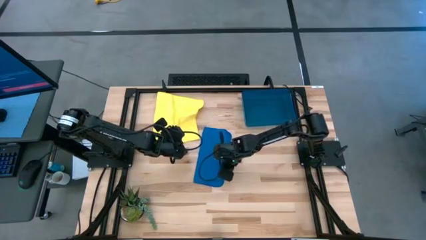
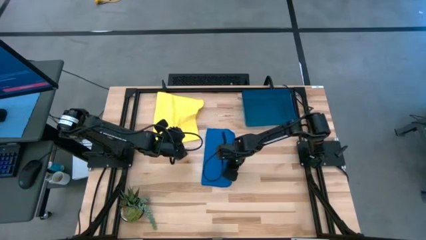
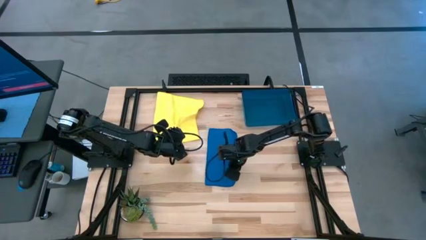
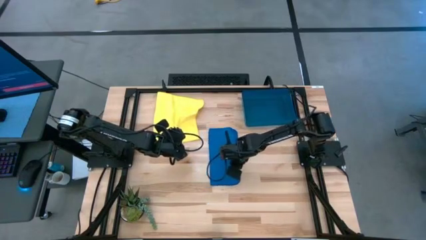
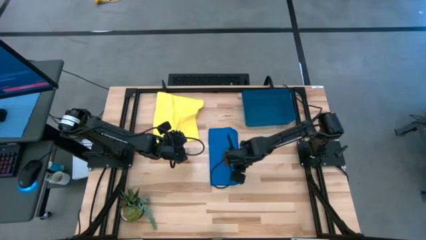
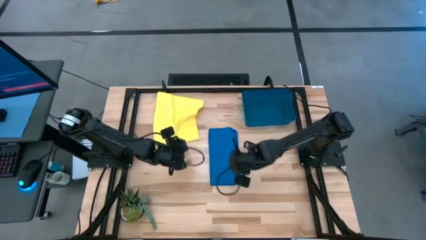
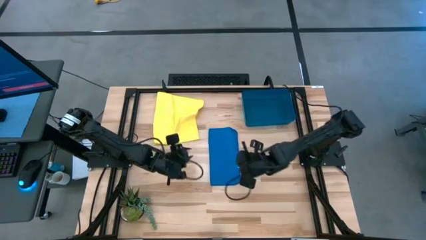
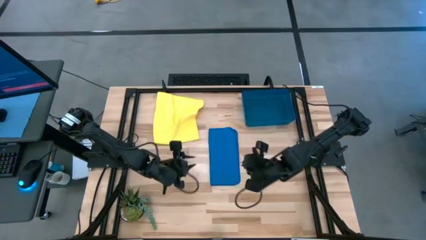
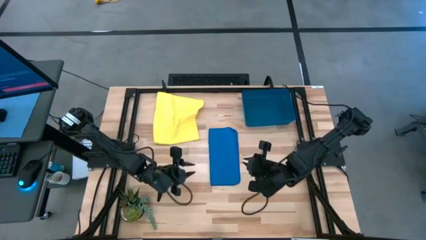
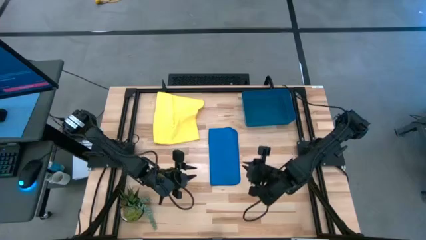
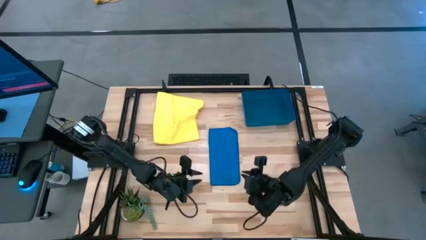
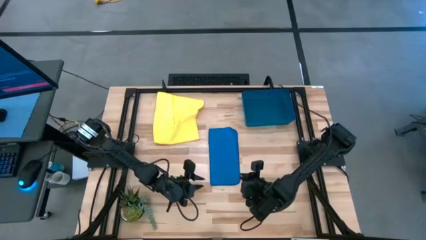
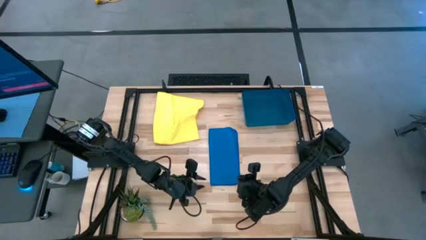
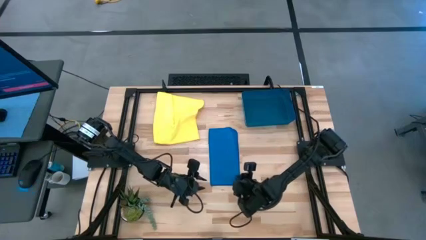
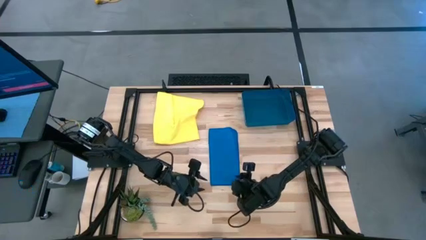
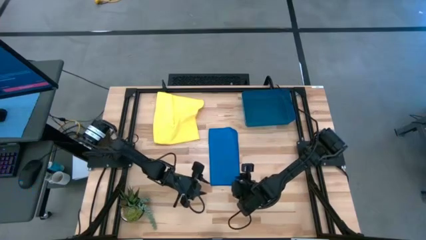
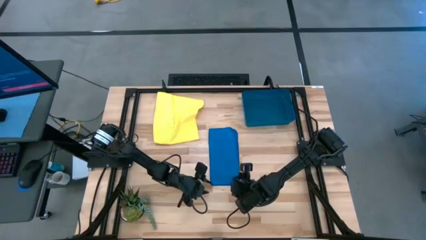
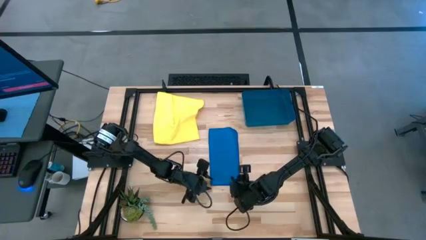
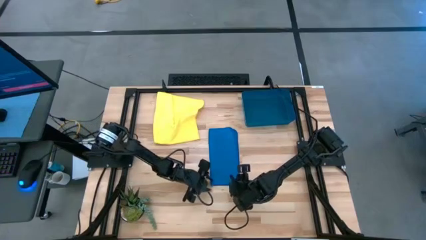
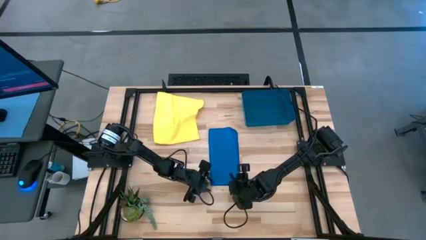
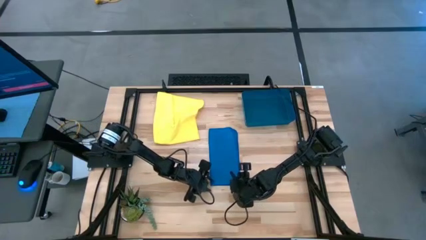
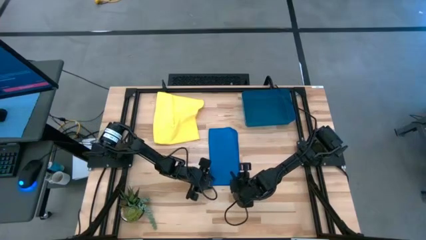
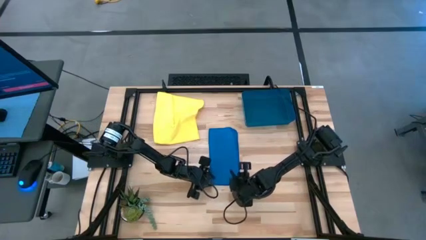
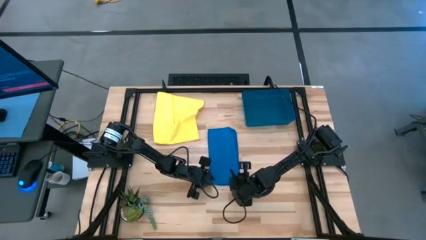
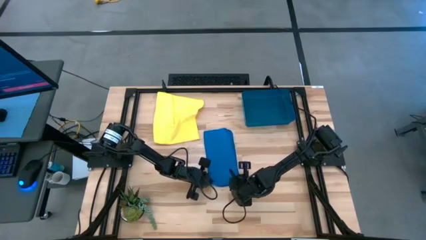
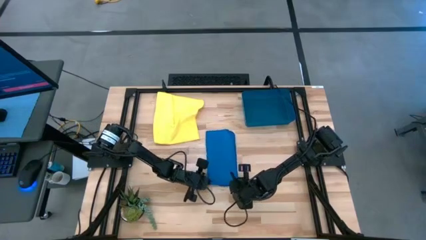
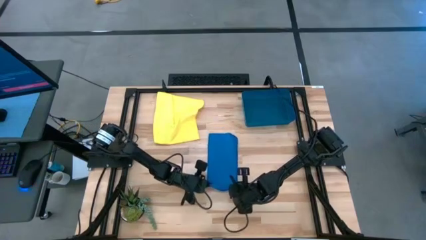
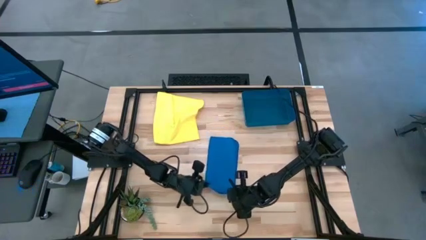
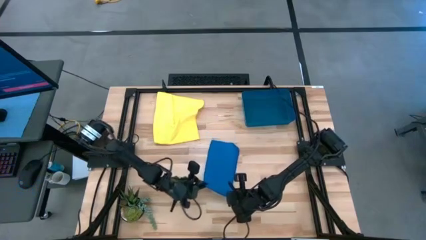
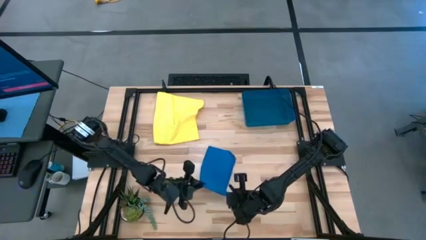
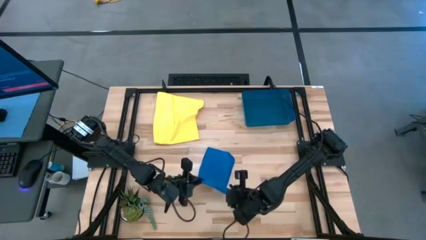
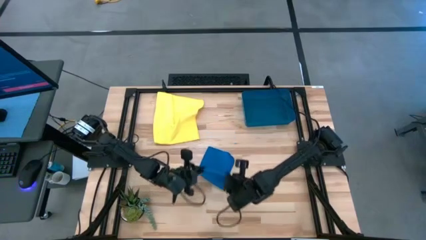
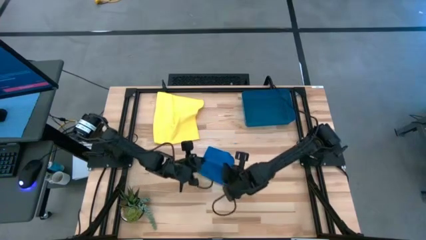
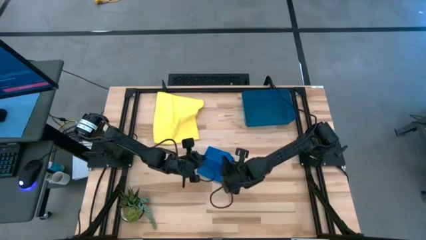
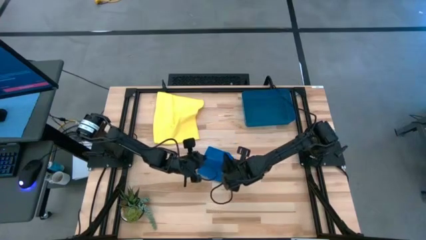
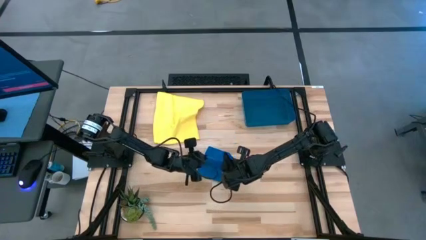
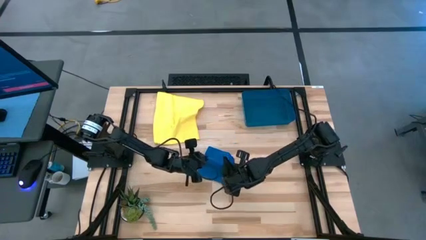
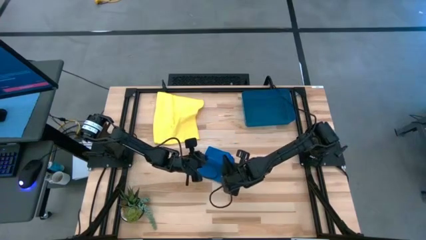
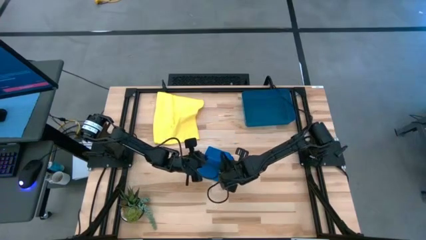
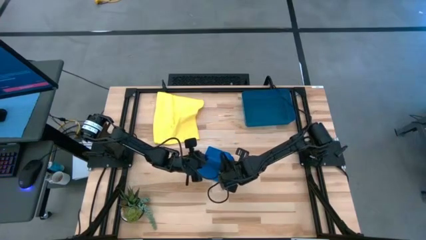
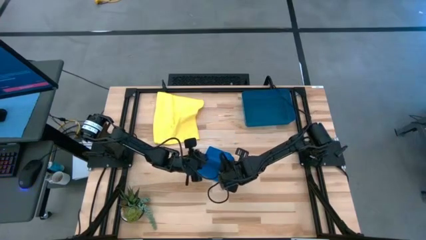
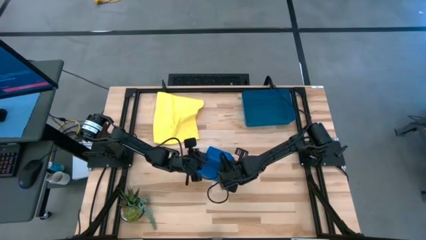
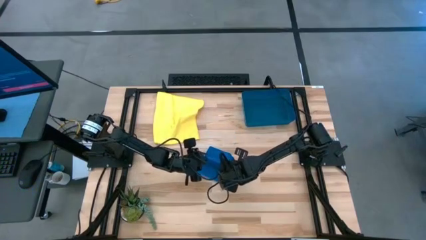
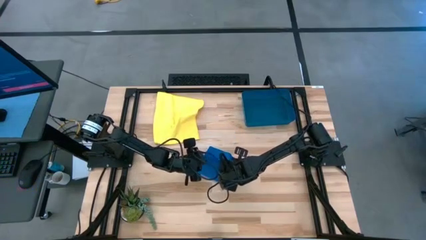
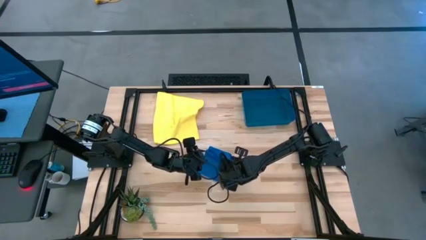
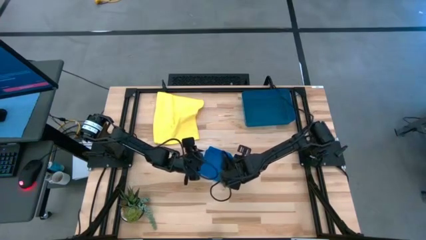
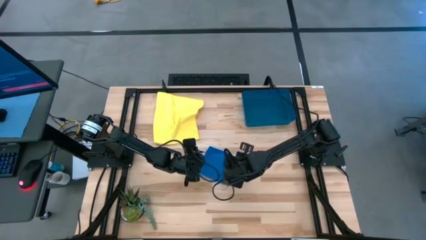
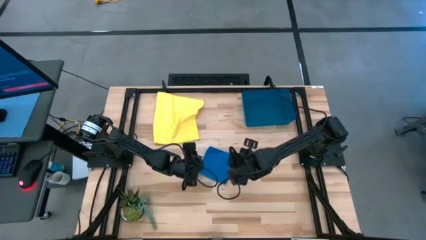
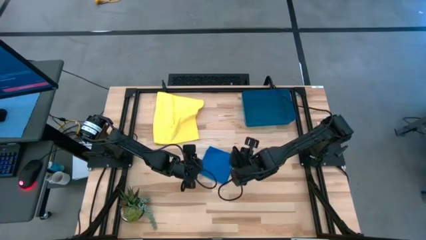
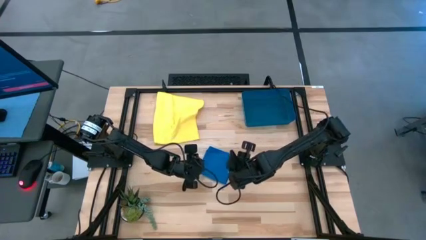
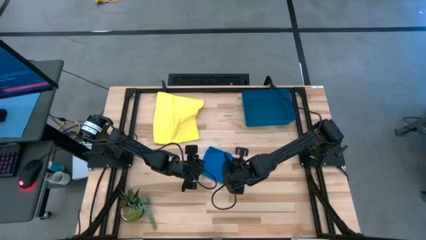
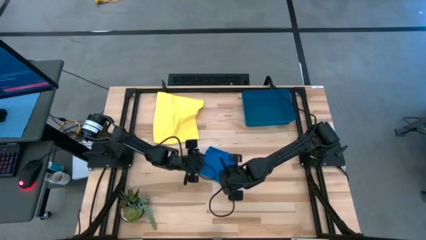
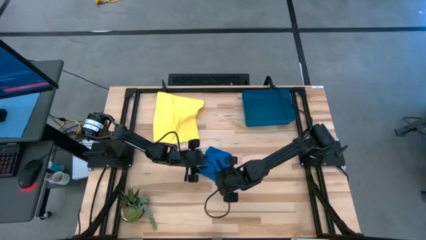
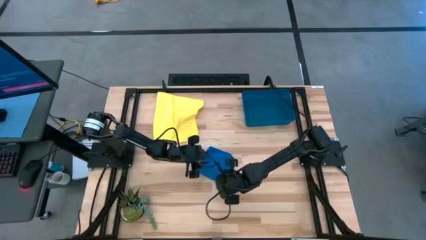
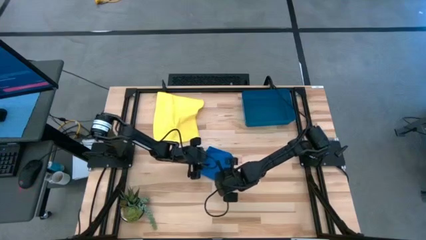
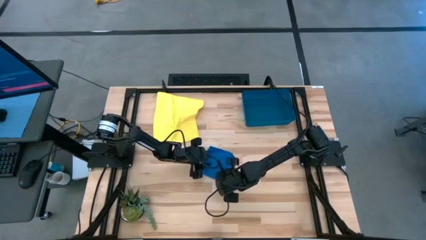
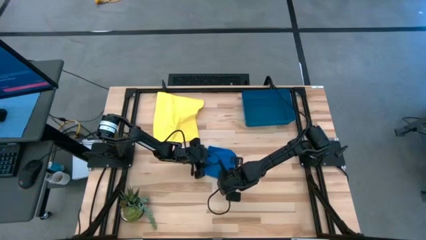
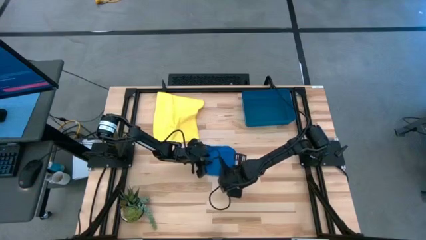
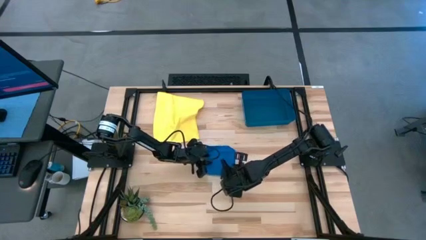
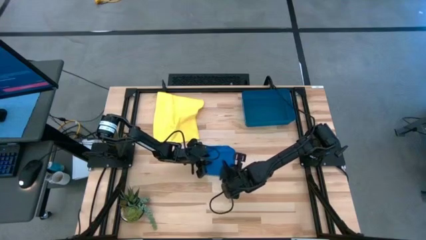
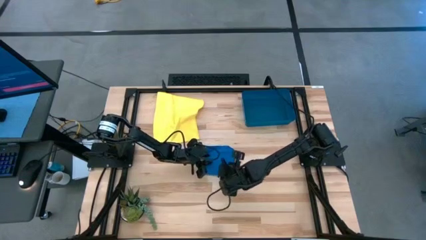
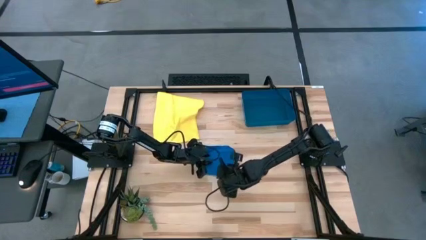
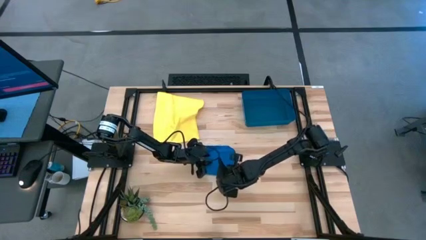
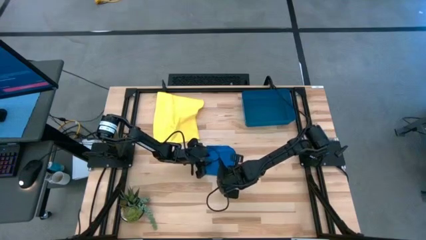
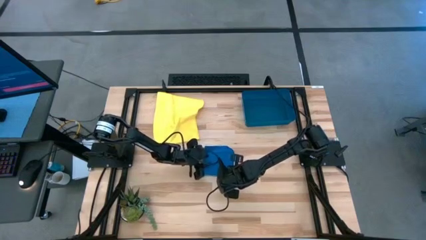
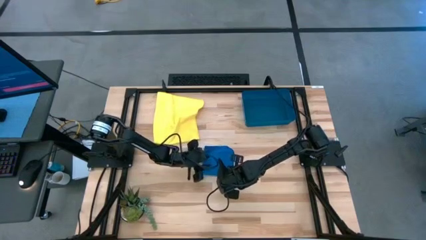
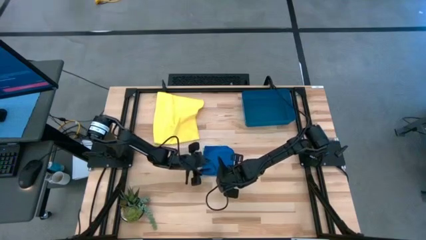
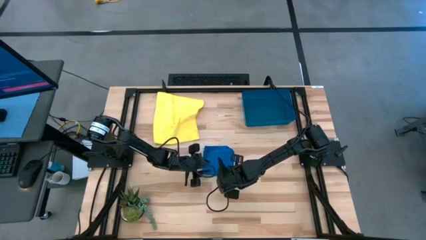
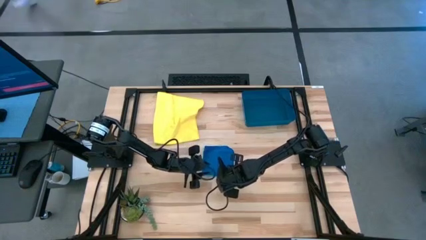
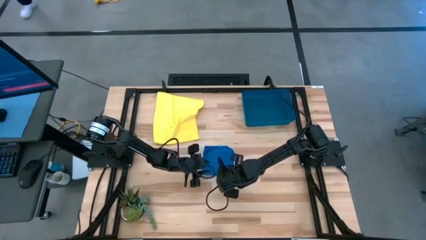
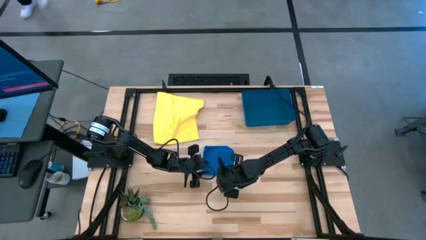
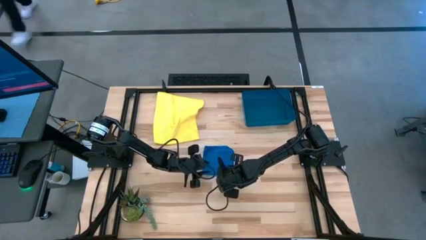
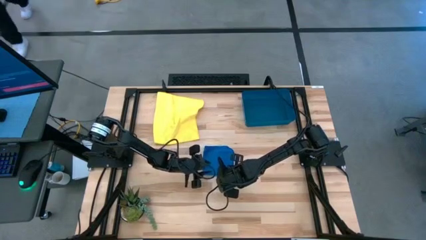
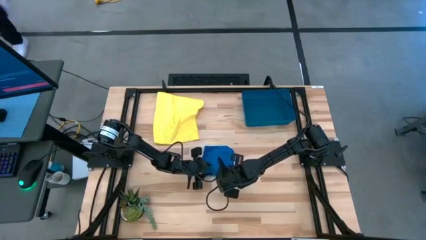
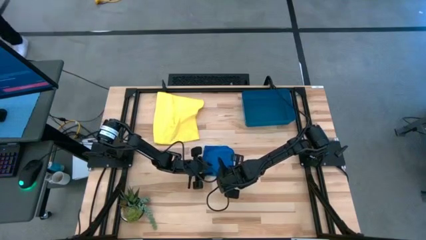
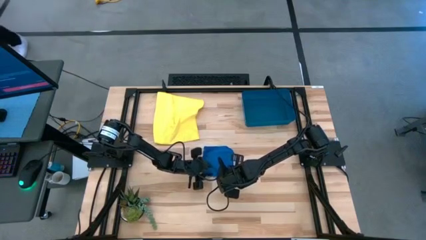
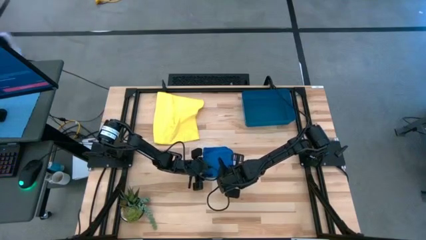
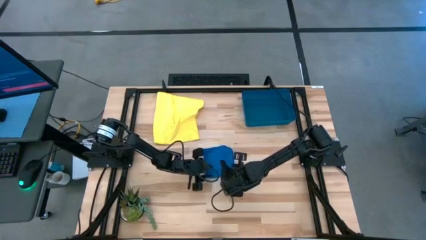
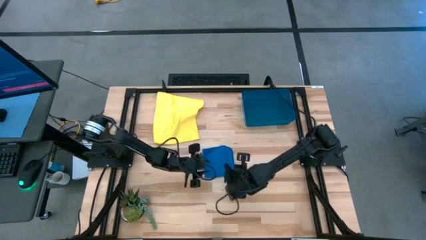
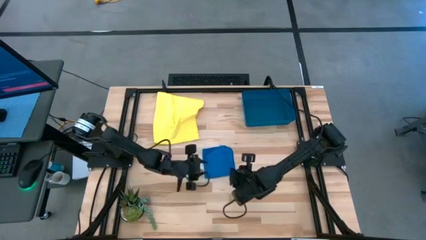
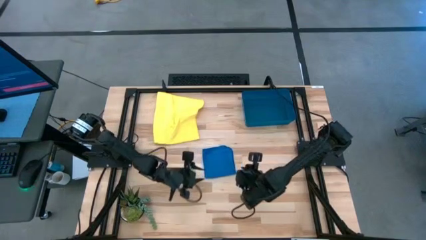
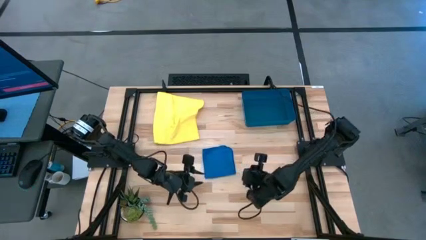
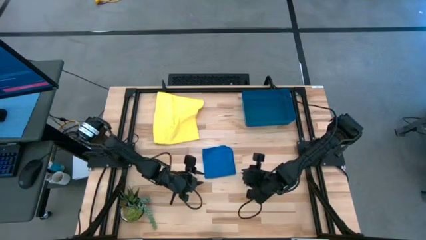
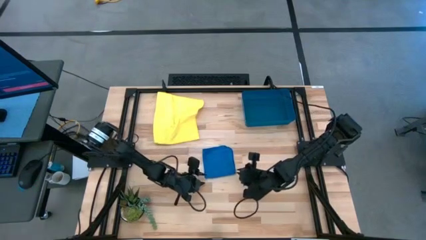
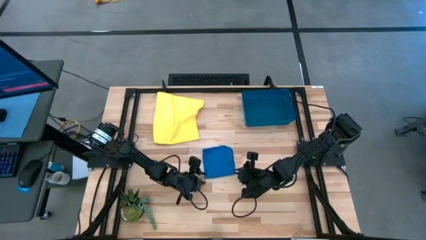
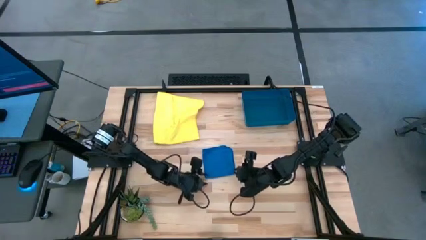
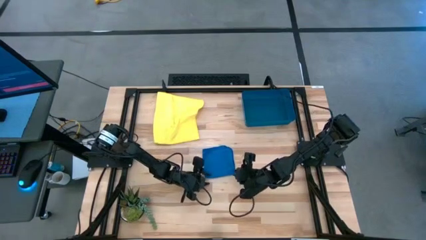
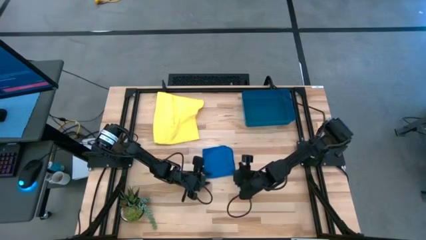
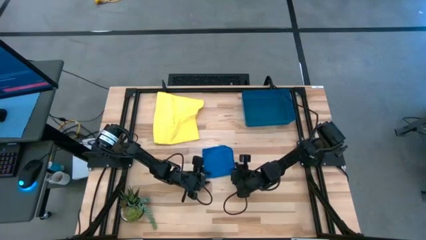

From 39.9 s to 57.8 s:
Task: Roll microfiber towels into tight, uniform cylinder then place into a basket
Roll the blue microfiber cloth
